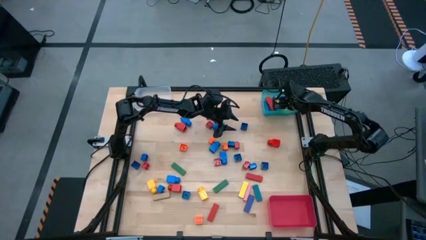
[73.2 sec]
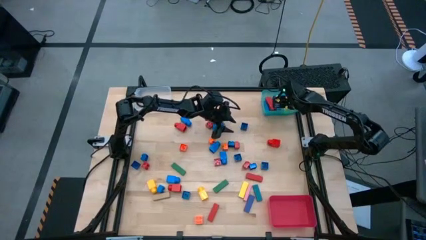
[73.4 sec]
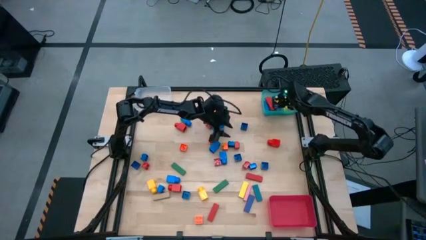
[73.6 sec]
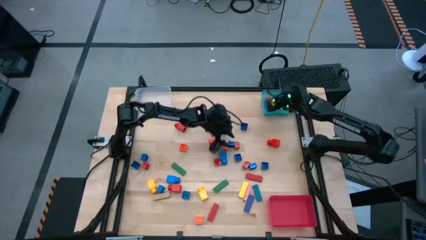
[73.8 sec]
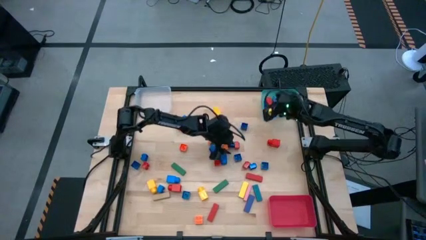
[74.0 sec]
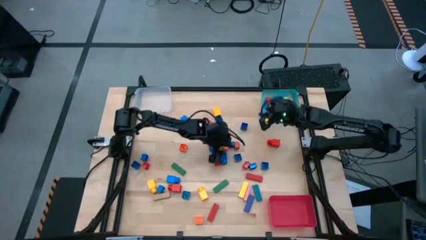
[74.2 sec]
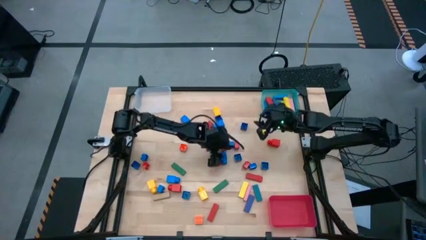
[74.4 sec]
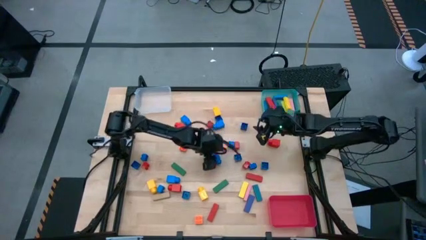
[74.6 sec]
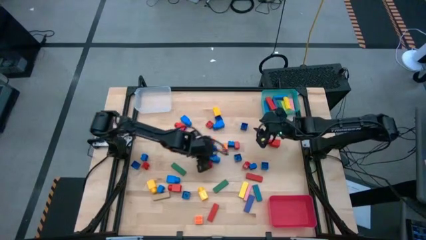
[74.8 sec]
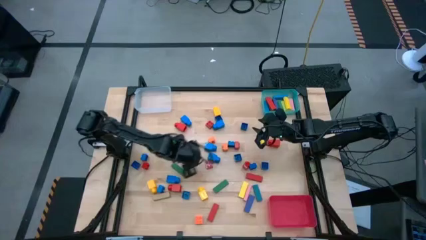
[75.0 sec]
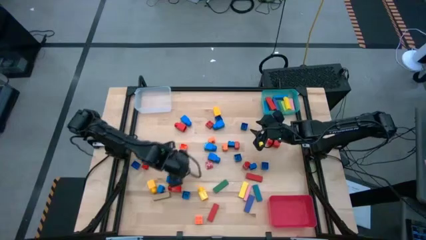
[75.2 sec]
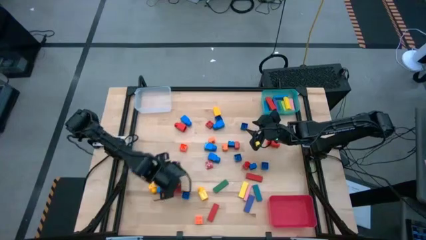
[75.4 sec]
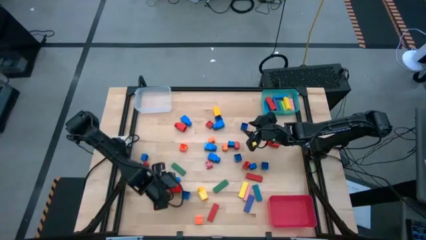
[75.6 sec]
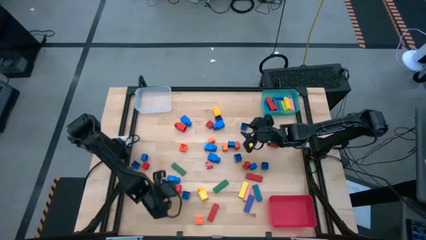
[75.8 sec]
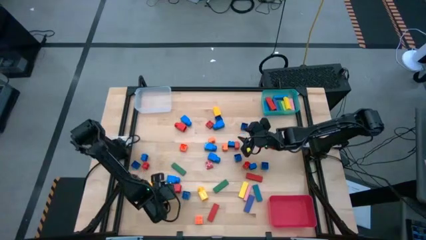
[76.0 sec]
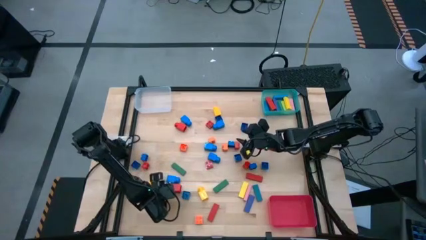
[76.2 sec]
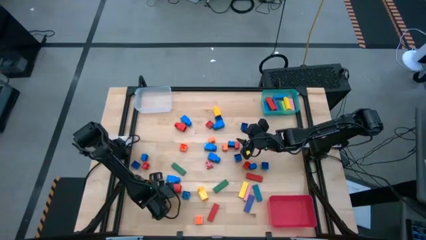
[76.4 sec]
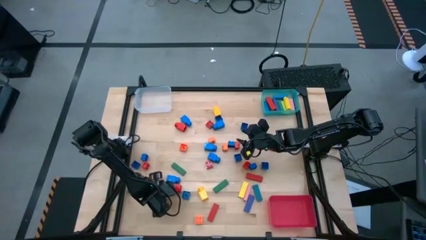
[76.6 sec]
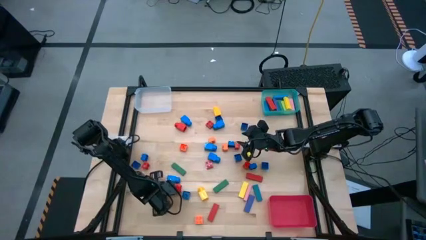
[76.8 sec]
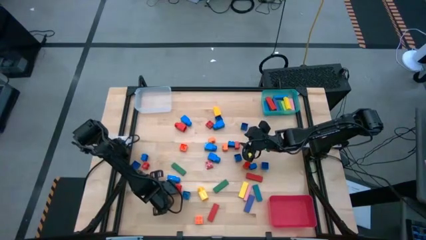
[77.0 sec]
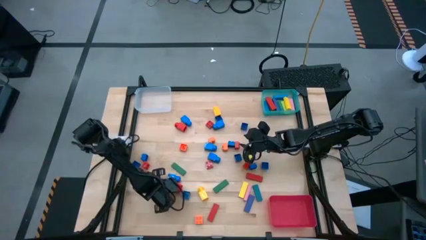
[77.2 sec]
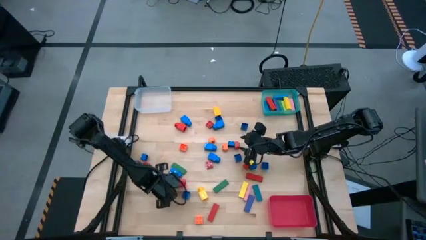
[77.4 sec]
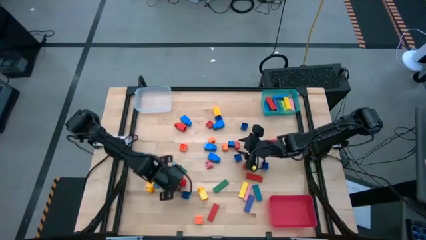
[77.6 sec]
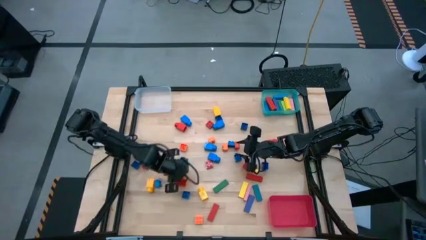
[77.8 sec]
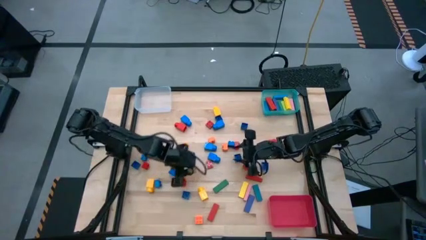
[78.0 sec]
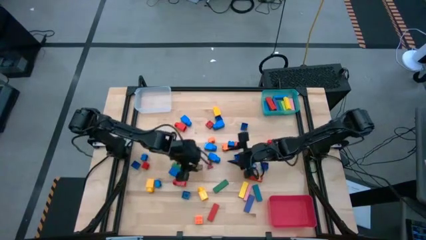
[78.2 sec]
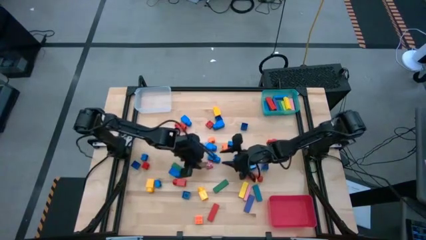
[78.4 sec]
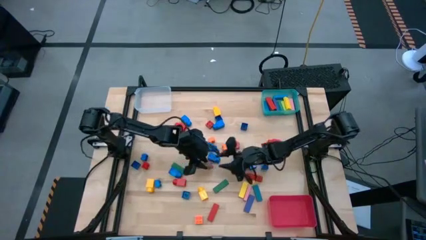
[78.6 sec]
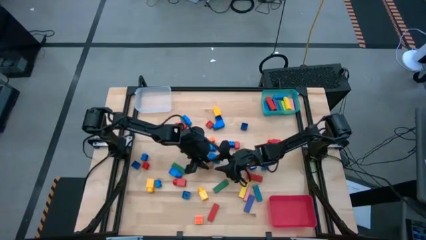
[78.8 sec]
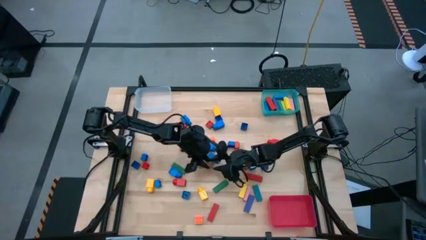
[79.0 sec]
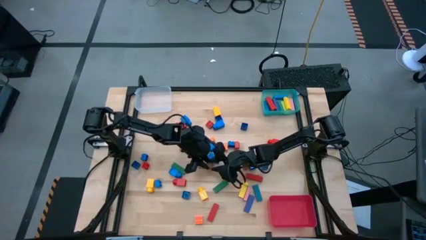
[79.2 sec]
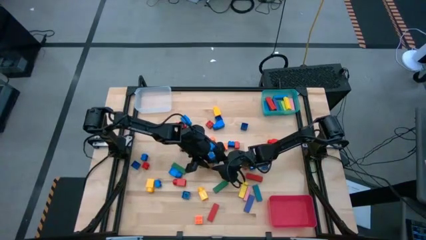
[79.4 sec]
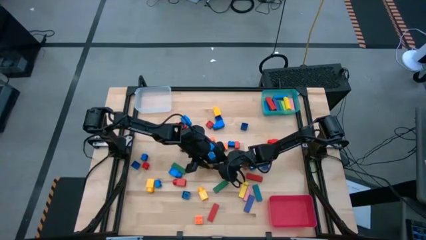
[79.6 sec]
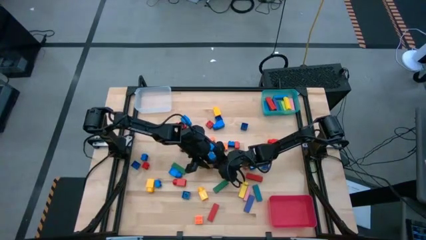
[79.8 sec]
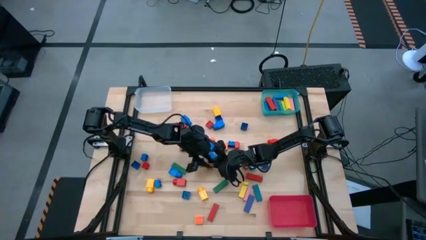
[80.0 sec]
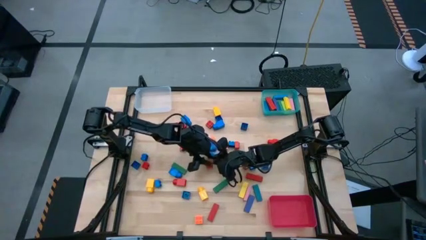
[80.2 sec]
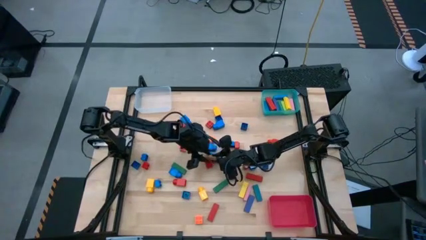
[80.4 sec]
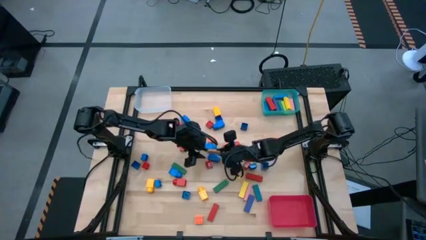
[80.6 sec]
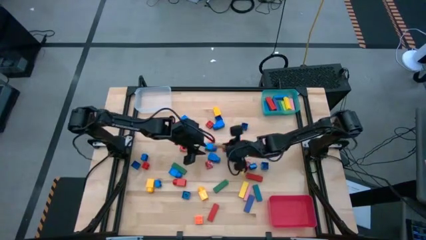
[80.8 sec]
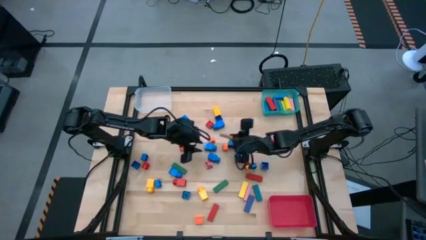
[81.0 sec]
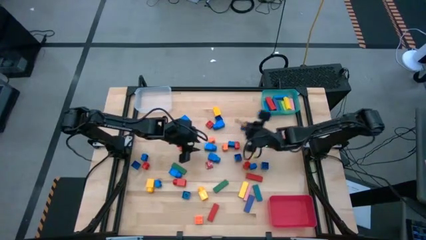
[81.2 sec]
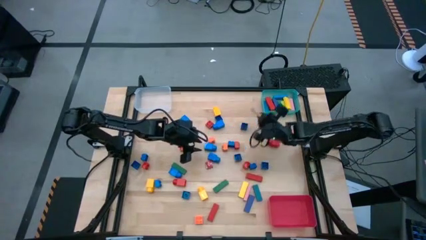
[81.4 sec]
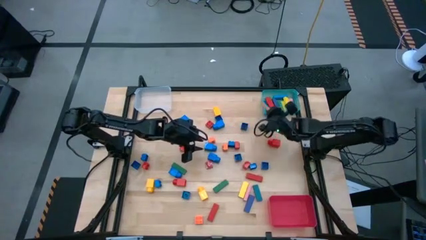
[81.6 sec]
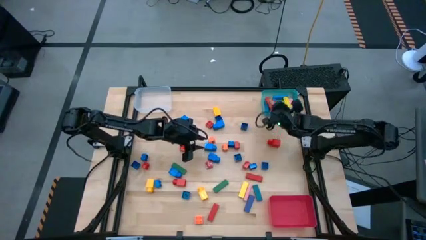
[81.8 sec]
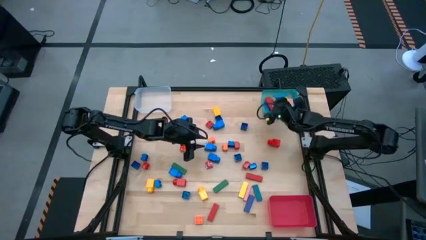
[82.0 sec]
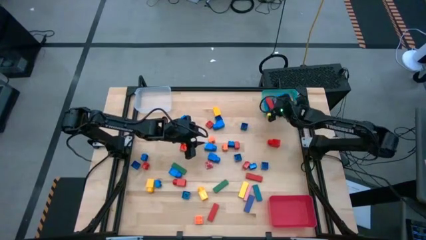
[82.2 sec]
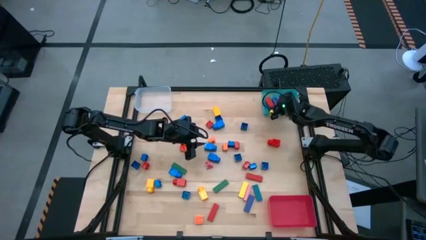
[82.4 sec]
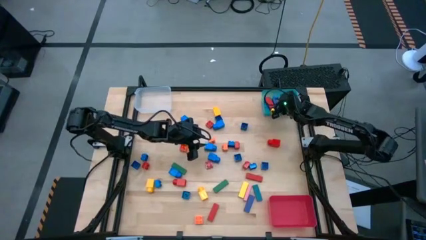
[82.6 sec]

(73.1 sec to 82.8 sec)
Task: Sort blocks by size
Put the brown block into the blue bin

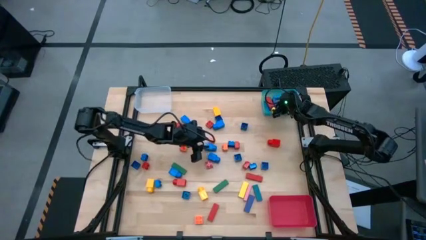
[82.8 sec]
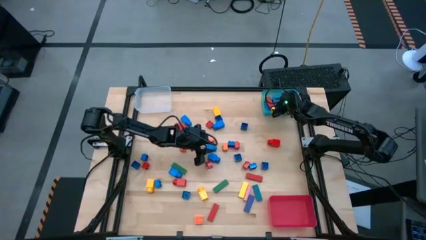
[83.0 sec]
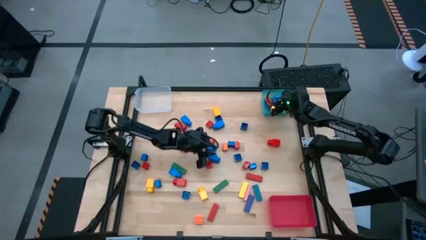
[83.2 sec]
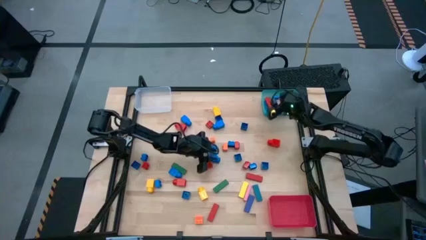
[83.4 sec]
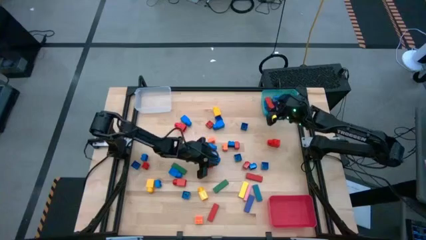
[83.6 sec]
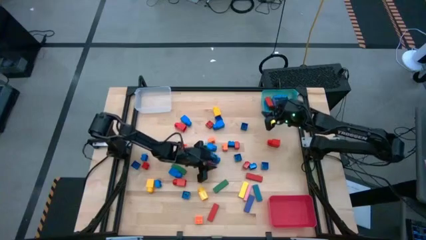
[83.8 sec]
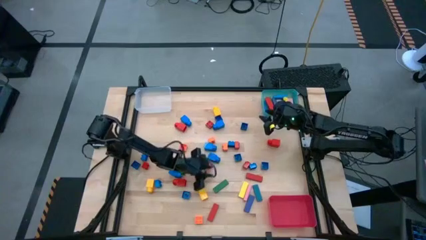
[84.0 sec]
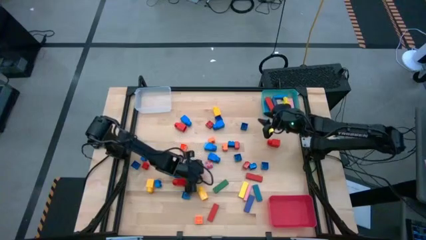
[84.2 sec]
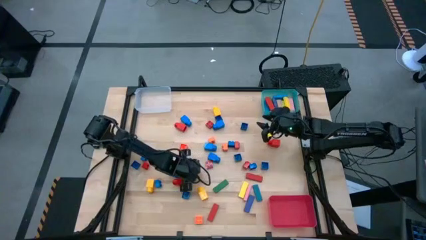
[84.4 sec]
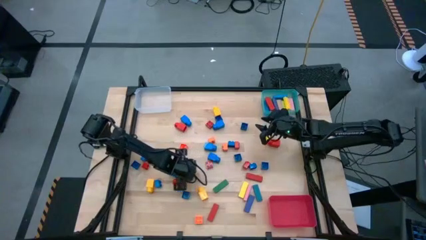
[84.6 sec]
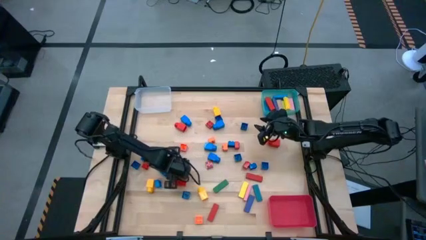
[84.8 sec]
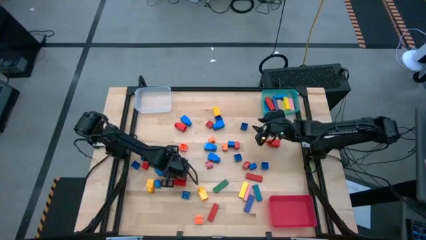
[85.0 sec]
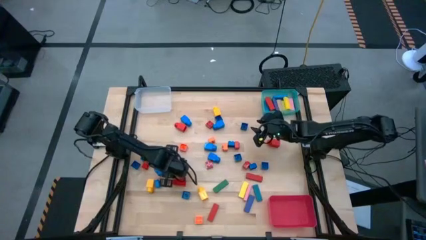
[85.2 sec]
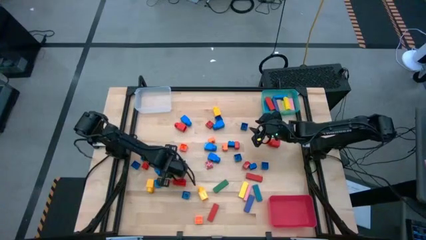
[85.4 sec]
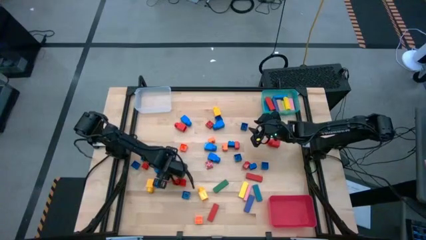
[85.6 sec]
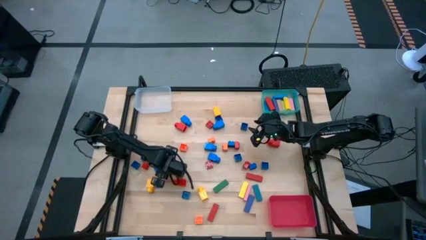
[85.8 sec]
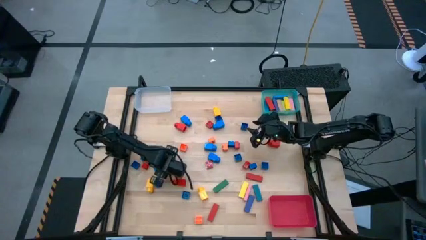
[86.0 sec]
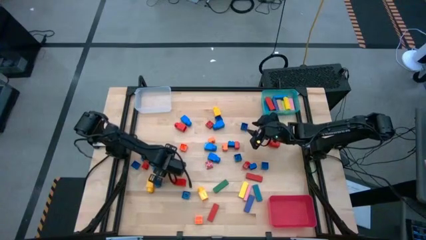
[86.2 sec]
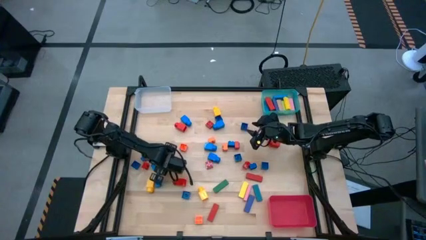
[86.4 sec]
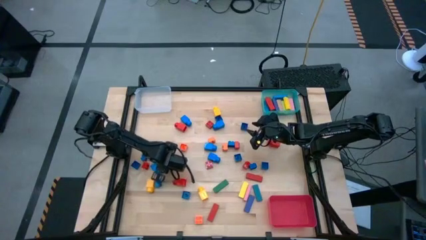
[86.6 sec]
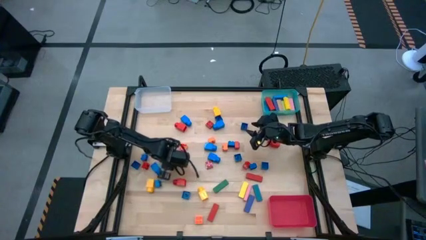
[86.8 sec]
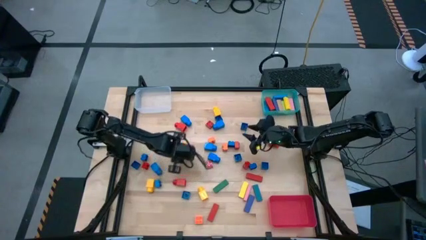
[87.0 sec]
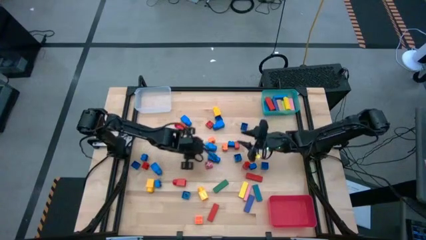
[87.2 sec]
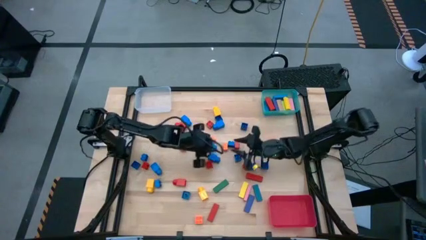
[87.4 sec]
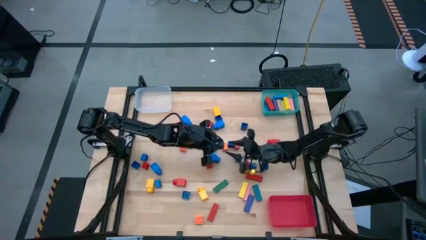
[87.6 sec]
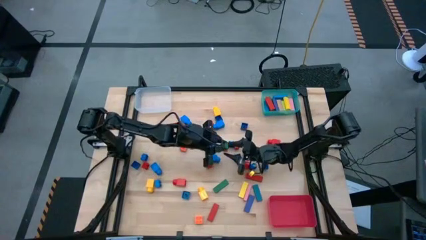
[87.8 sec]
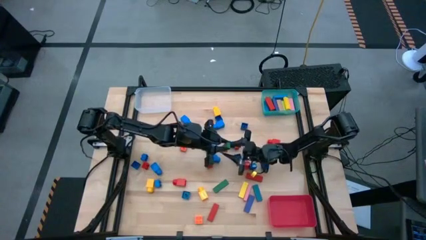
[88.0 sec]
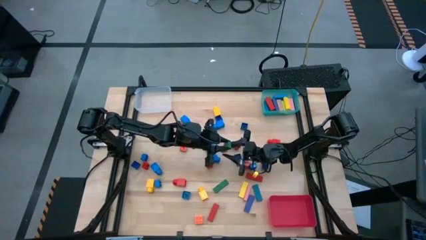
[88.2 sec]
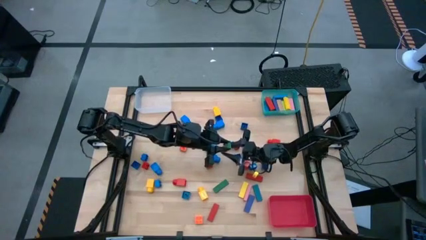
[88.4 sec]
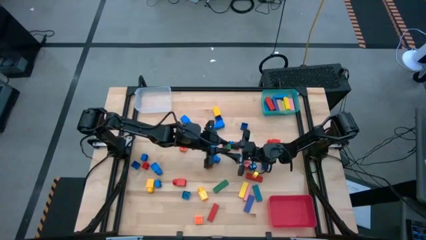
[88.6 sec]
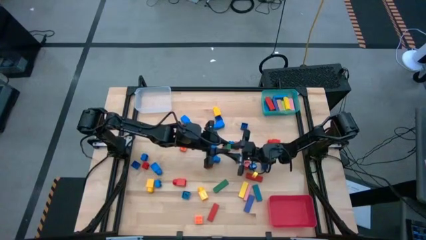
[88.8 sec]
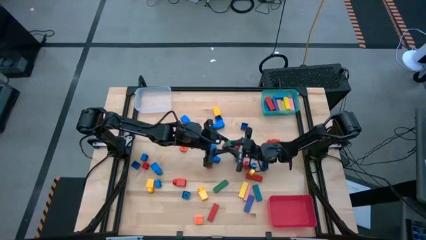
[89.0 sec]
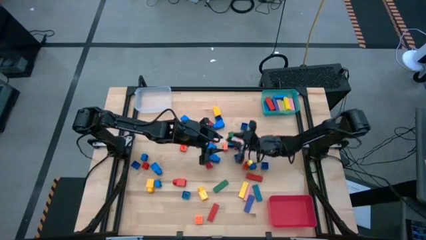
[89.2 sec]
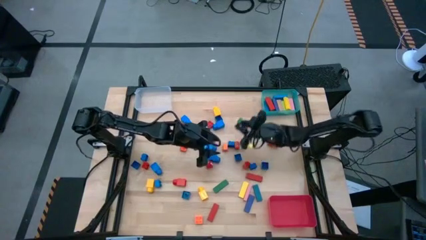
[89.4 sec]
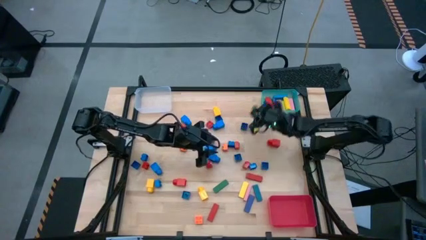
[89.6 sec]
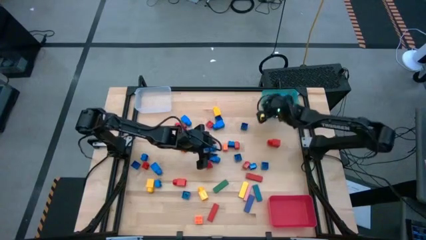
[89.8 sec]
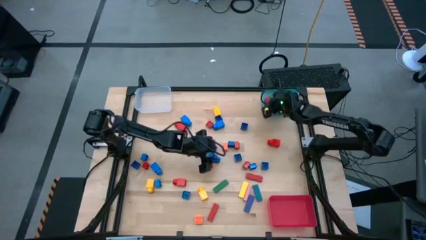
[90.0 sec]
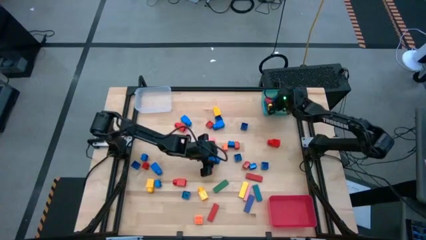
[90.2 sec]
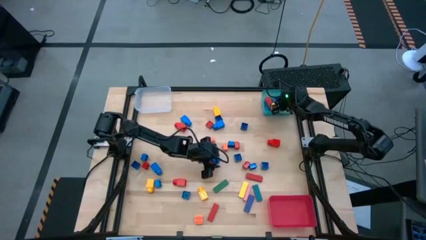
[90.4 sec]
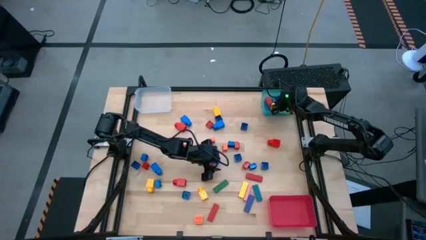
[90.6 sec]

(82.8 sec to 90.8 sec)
Put the green block into the blue bin
